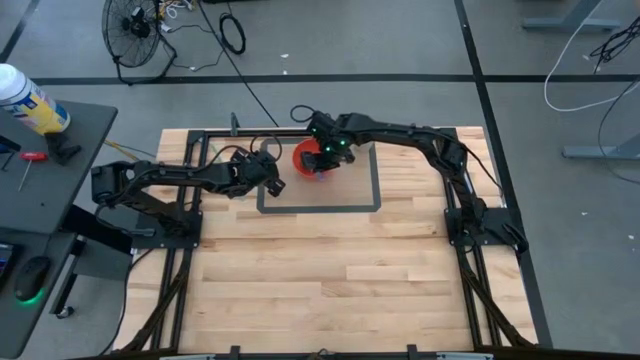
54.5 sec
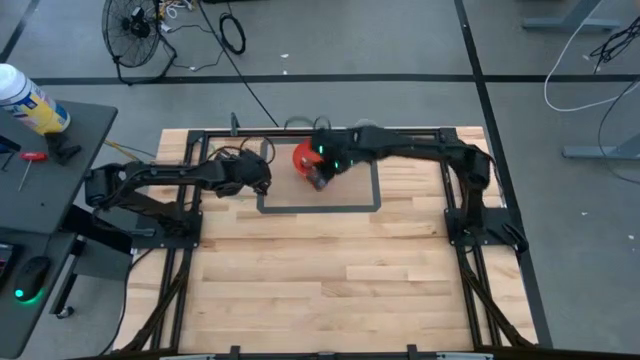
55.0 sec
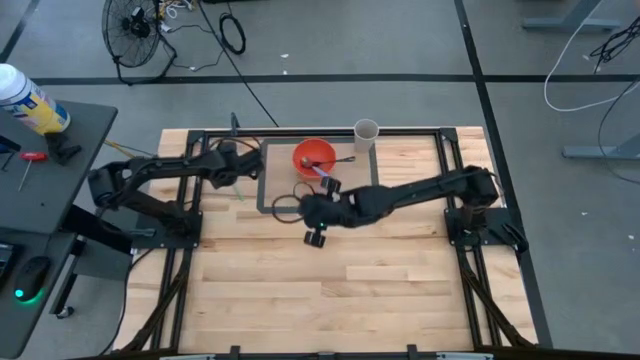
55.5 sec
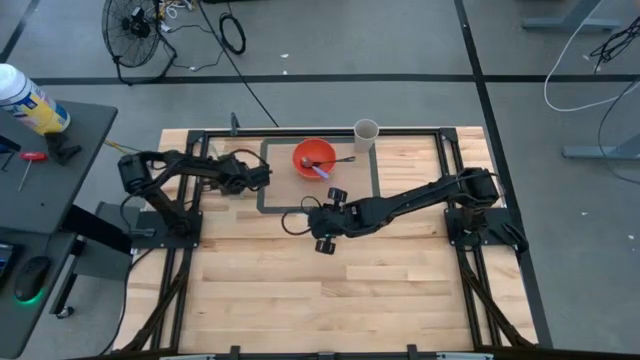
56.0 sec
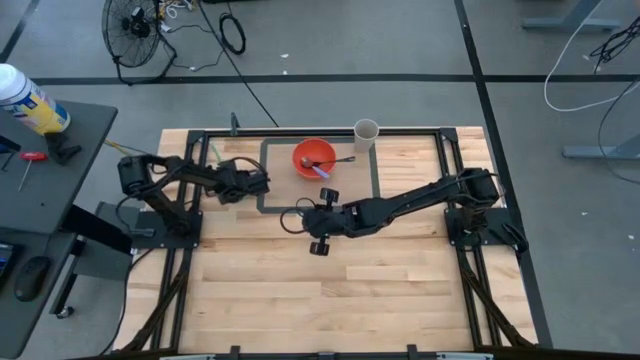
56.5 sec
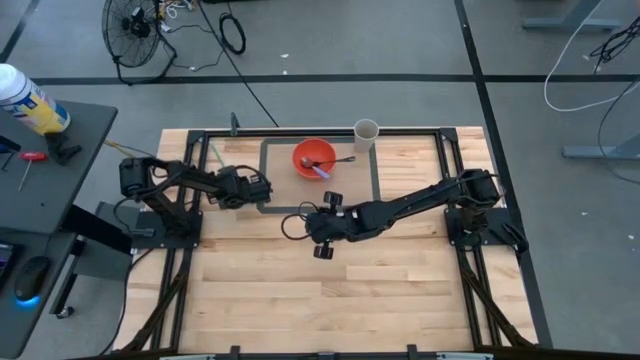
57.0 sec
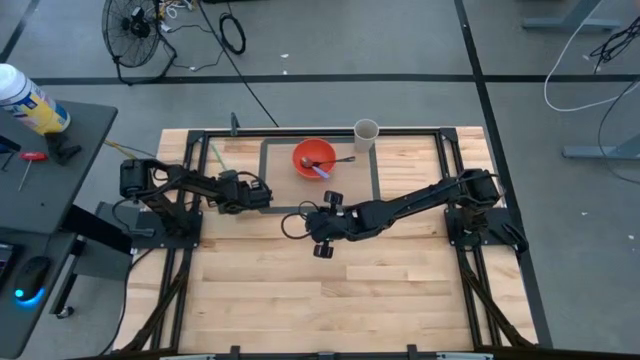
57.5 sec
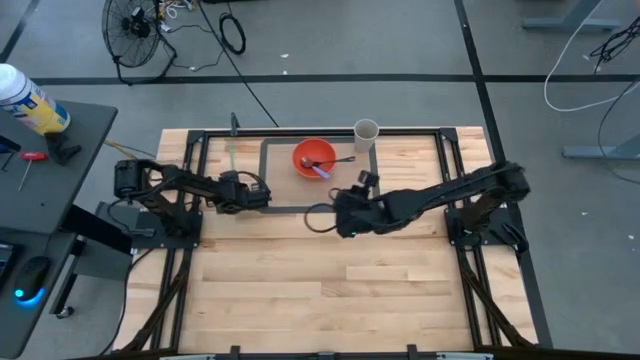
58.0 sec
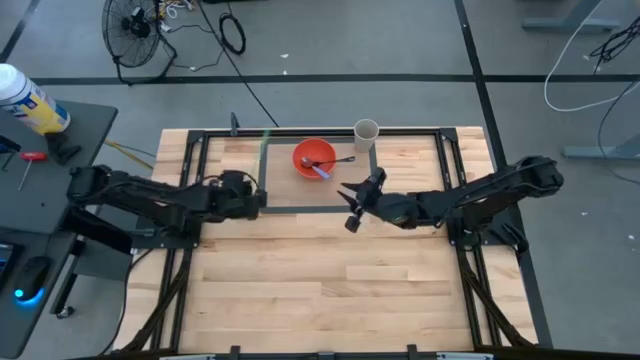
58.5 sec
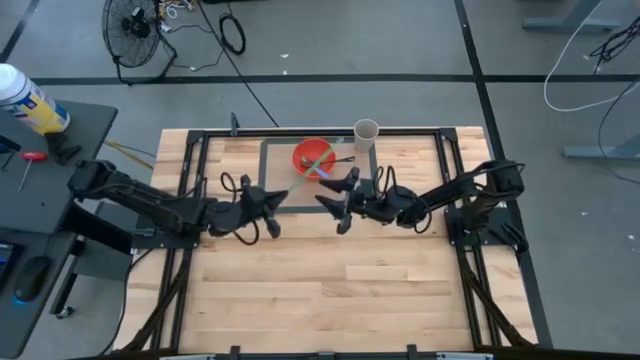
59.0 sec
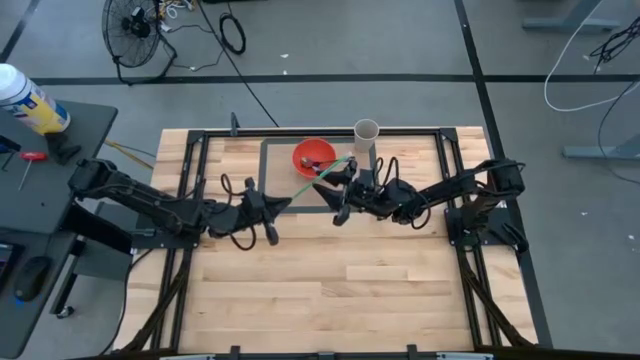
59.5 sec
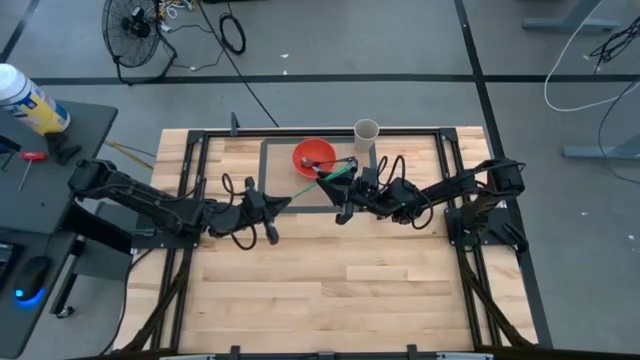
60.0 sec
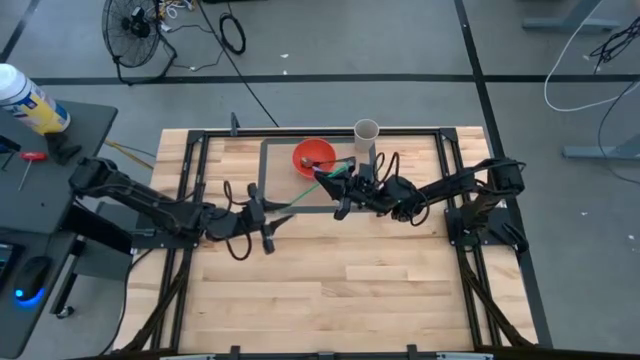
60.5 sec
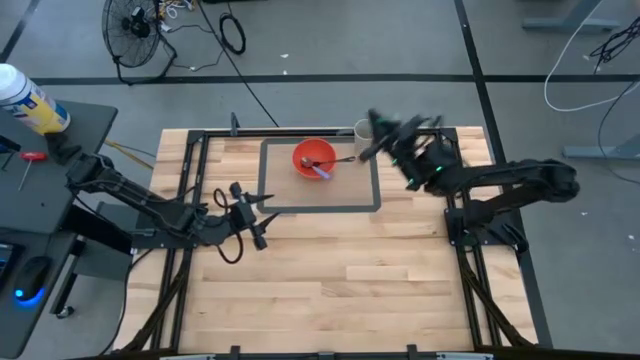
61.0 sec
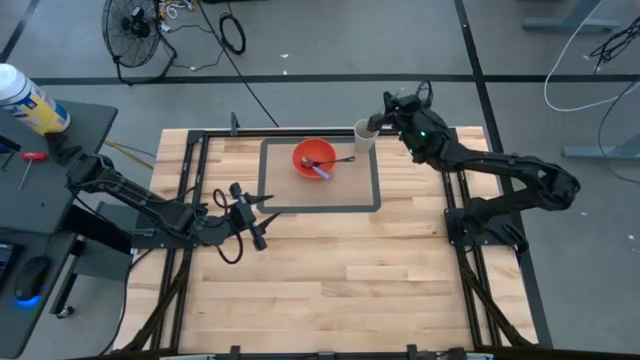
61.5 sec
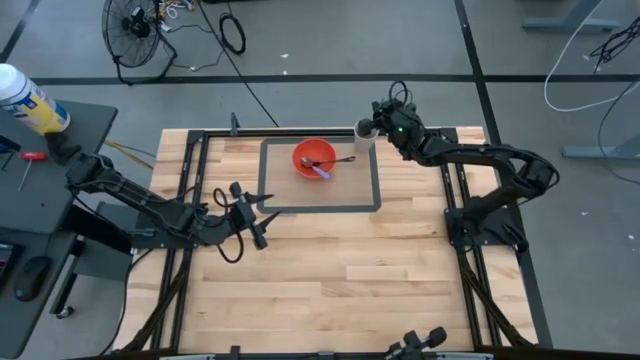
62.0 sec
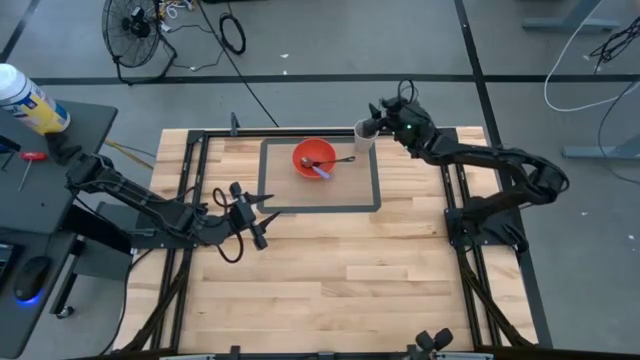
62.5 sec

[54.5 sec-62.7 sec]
Task: Pick & Place Utensil
Put the green straw in the white cup on the transparent mat

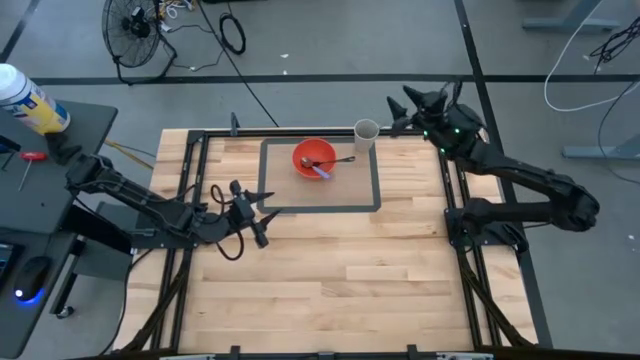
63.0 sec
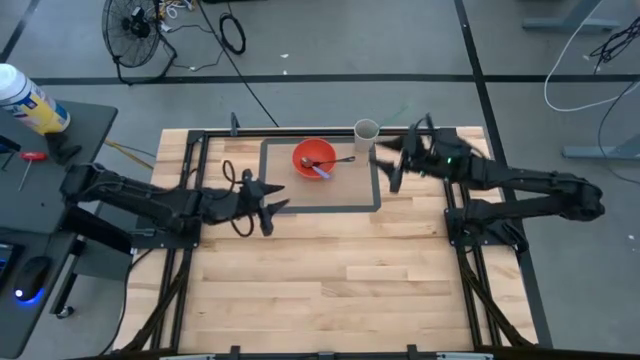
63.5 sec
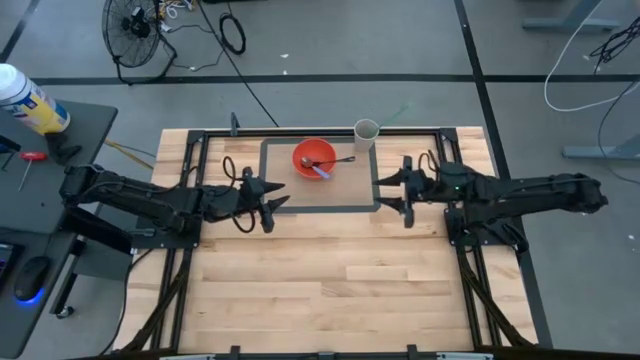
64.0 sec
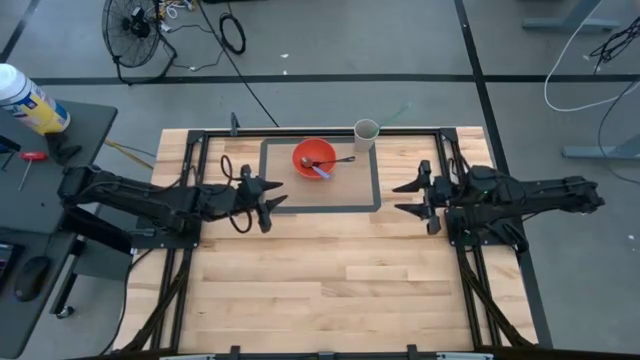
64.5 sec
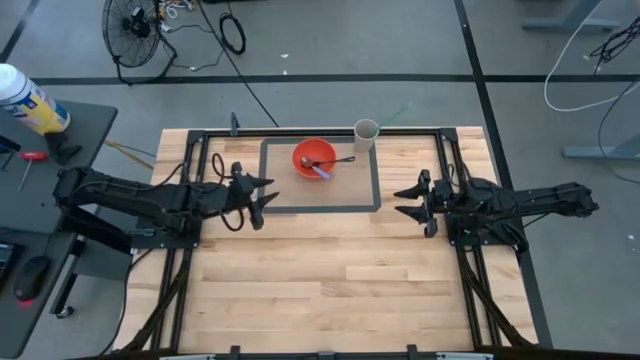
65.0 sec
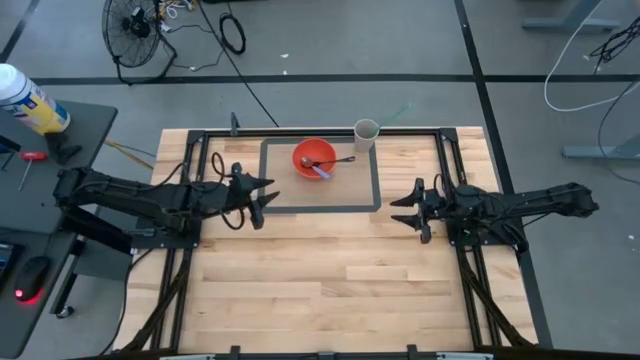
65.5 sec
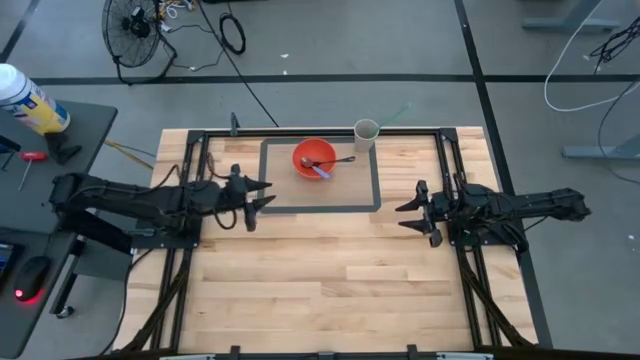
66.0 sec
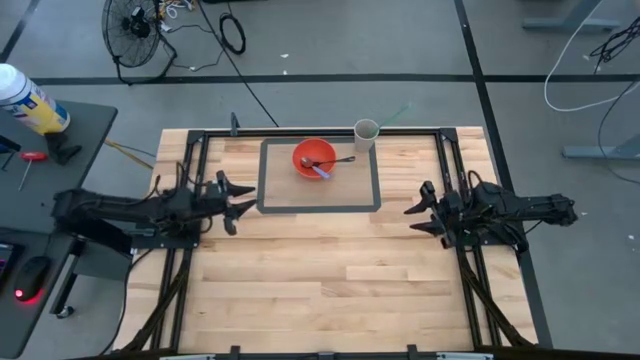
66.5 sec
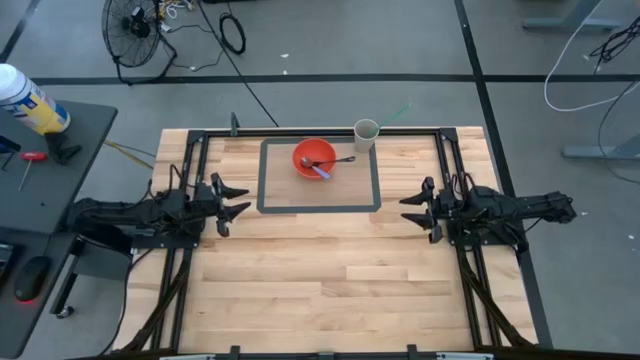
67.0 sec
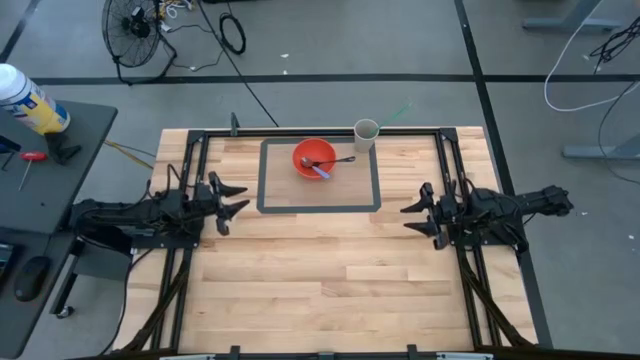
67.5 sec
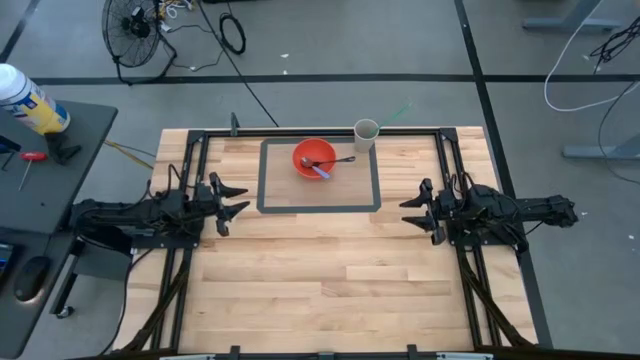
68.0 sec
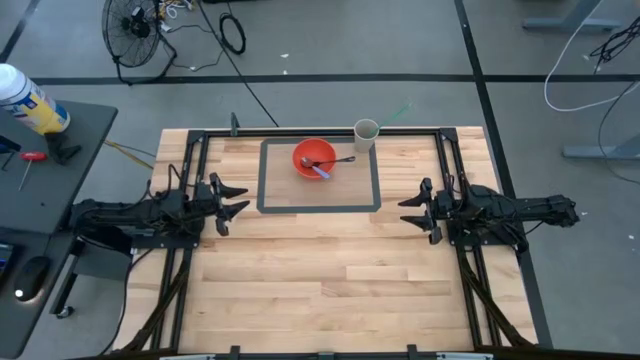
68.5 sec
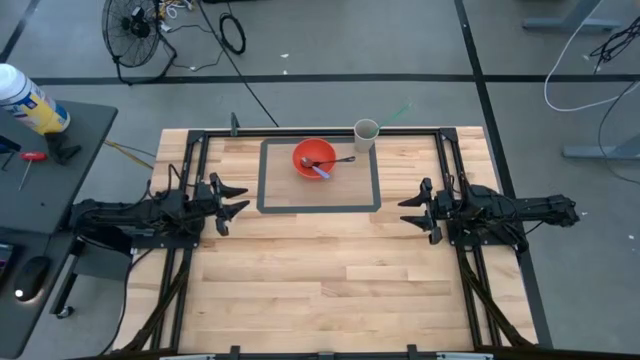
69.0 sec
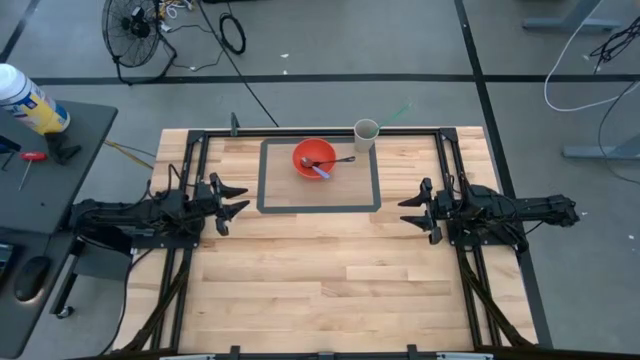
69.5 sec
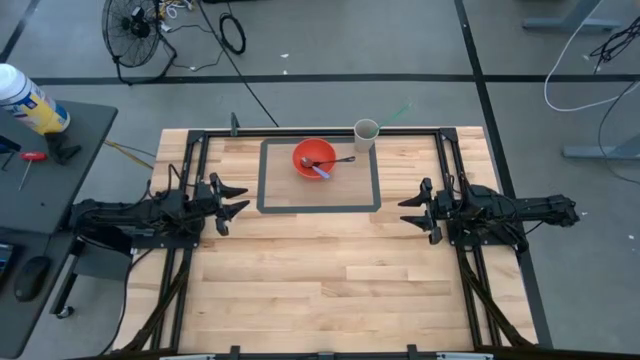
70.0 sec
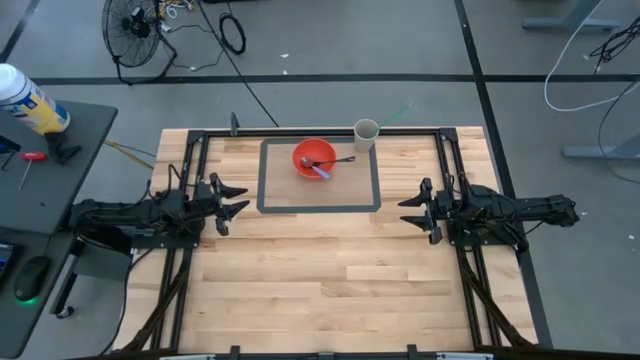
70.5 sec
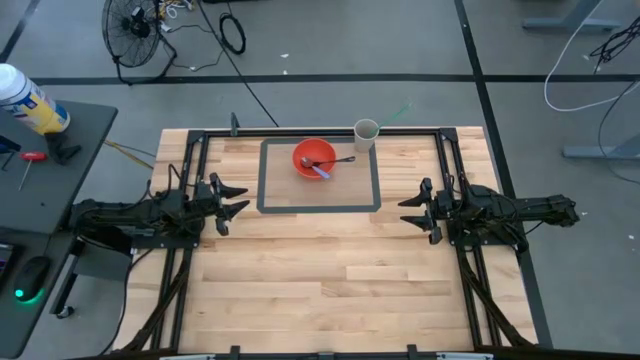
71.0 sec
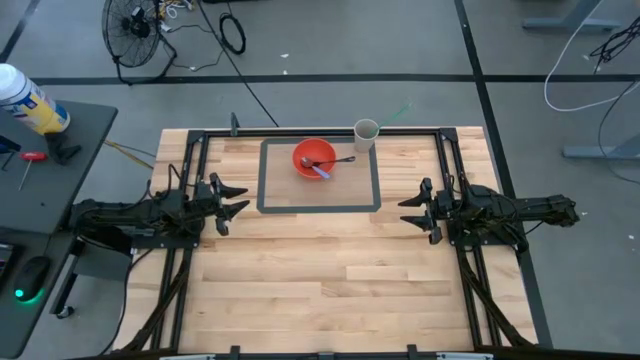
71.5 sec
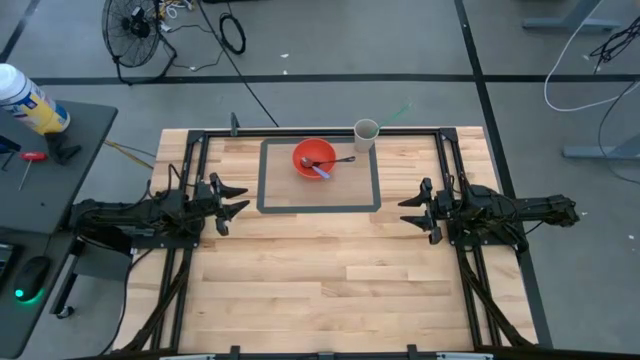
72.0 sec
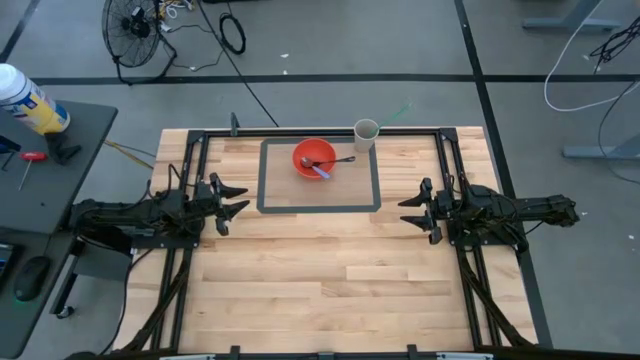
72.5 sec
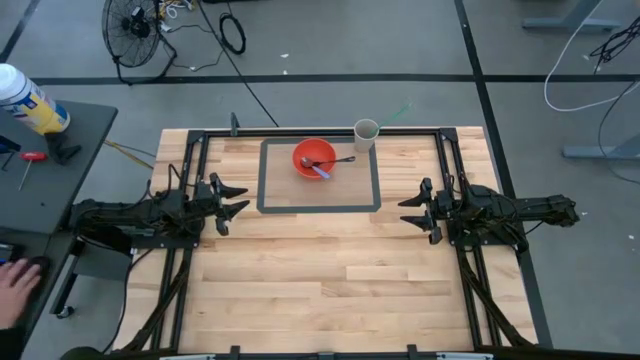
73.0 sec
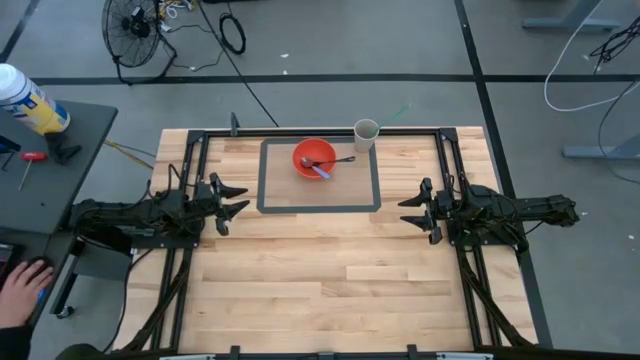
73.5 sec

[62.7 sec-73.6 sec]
Return to Home Position
